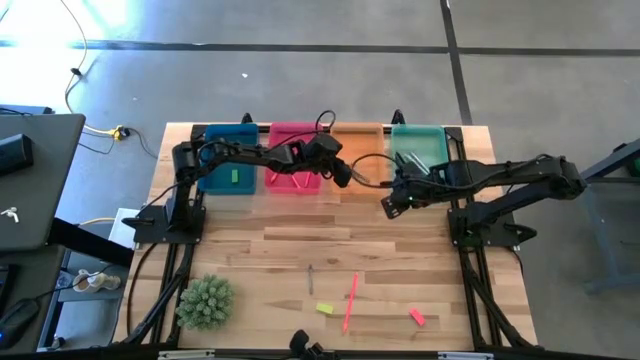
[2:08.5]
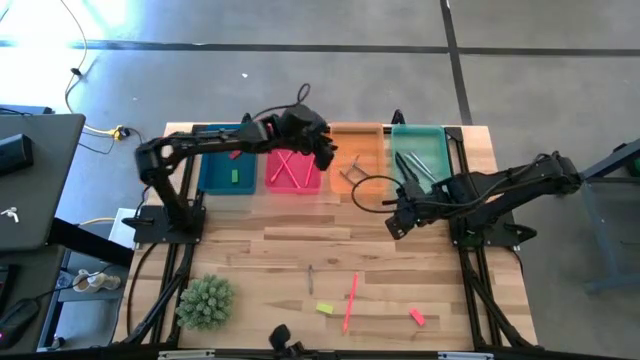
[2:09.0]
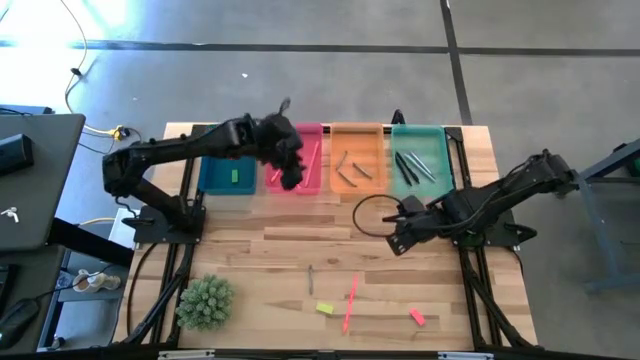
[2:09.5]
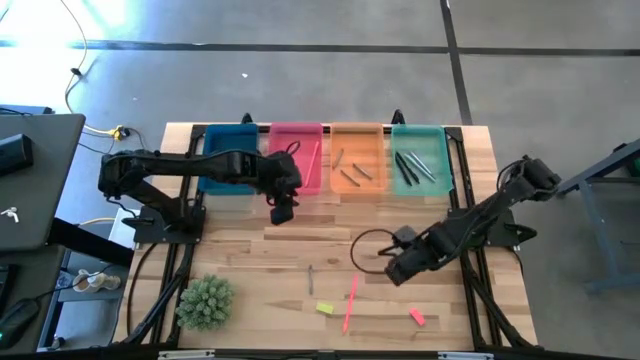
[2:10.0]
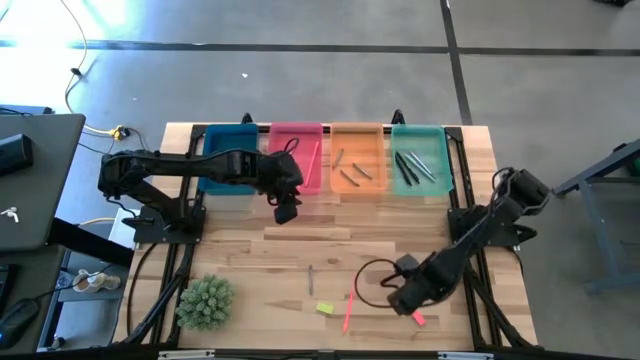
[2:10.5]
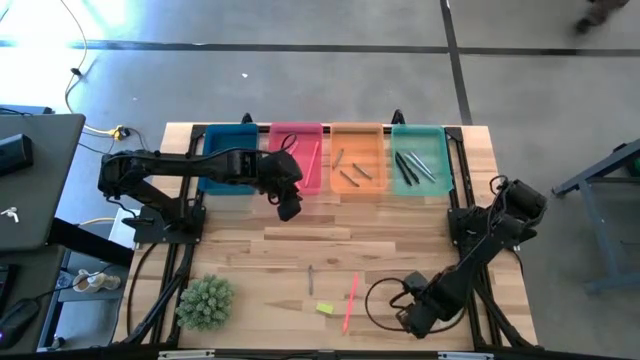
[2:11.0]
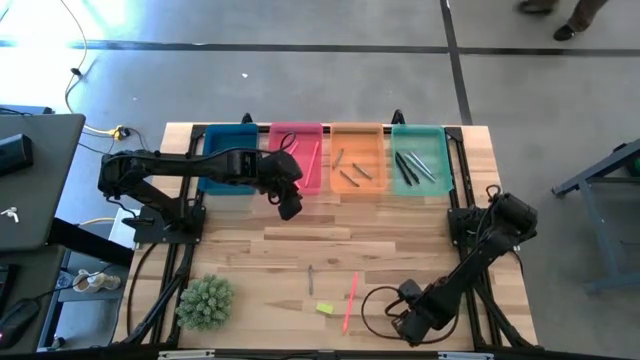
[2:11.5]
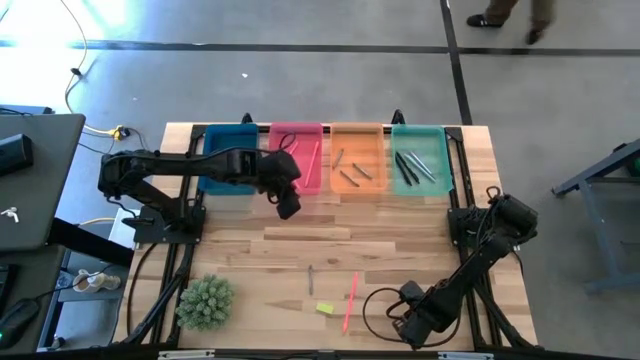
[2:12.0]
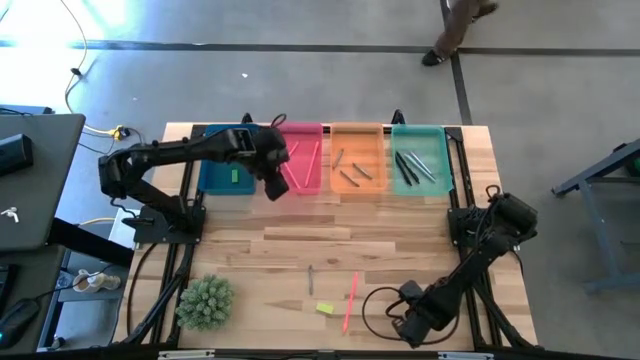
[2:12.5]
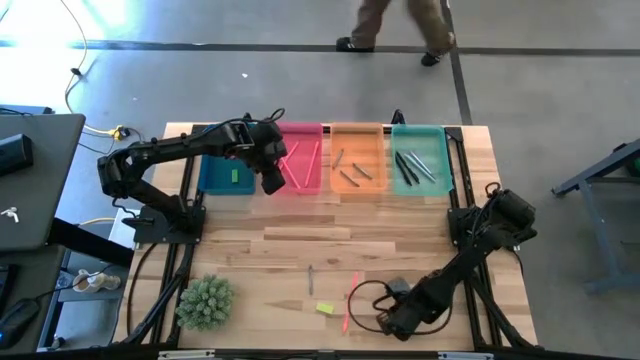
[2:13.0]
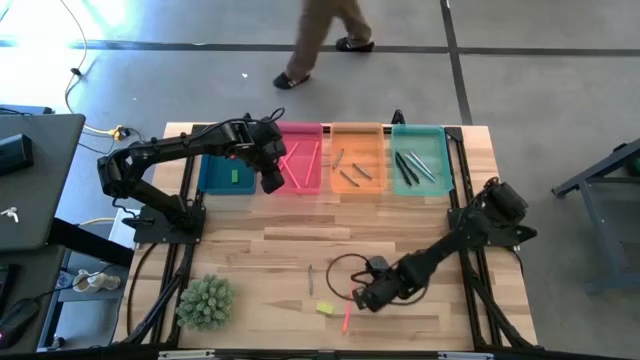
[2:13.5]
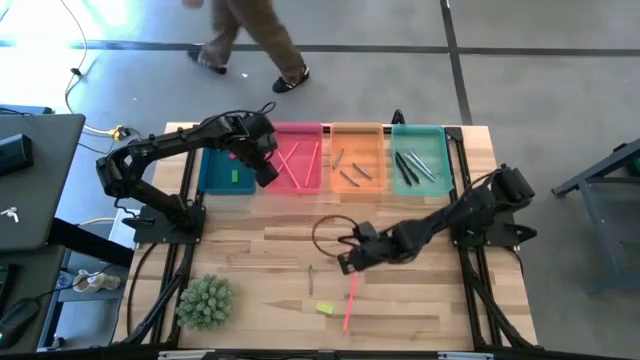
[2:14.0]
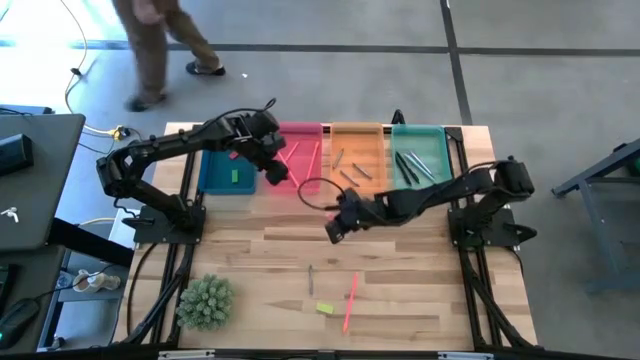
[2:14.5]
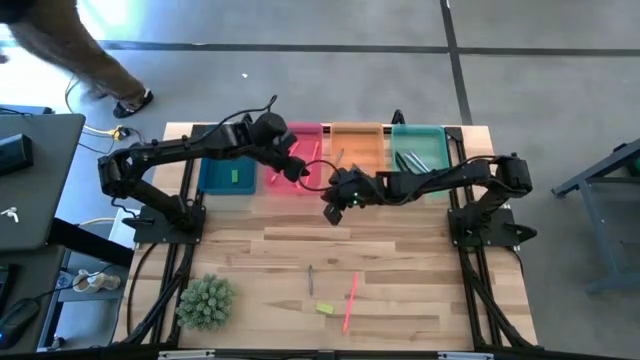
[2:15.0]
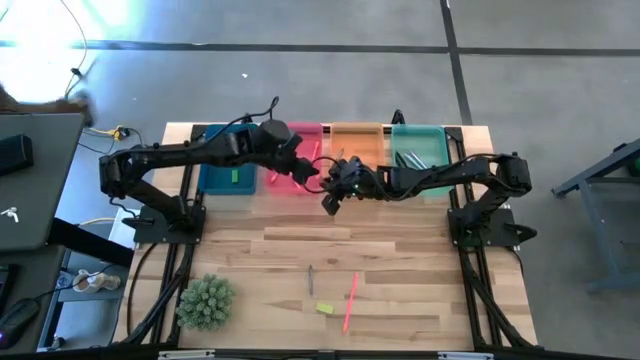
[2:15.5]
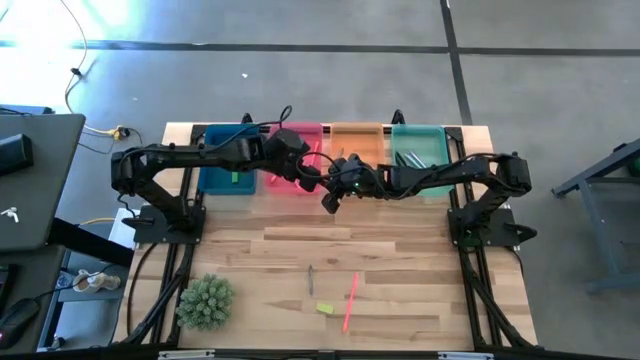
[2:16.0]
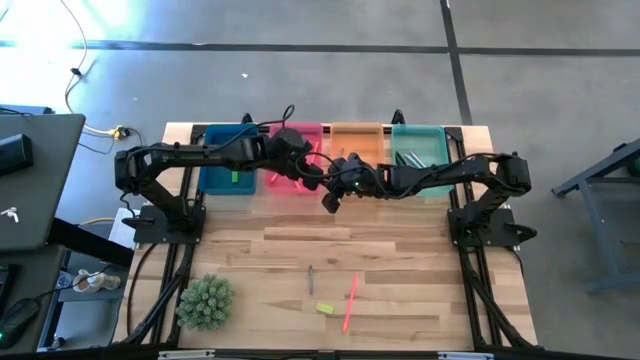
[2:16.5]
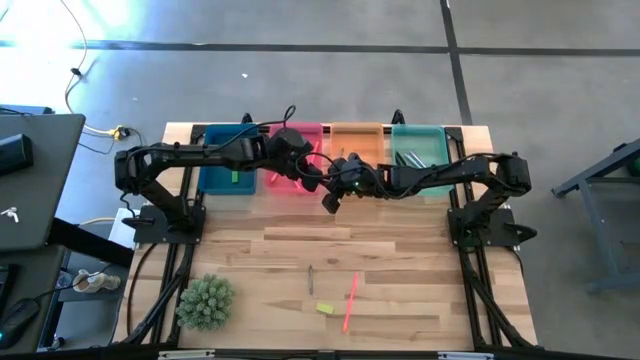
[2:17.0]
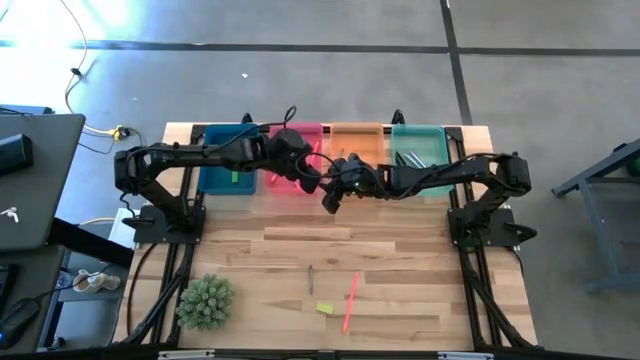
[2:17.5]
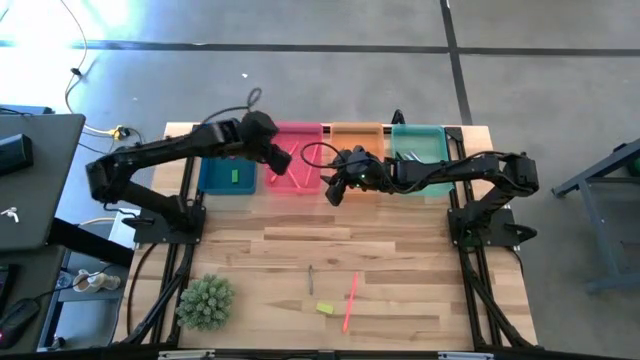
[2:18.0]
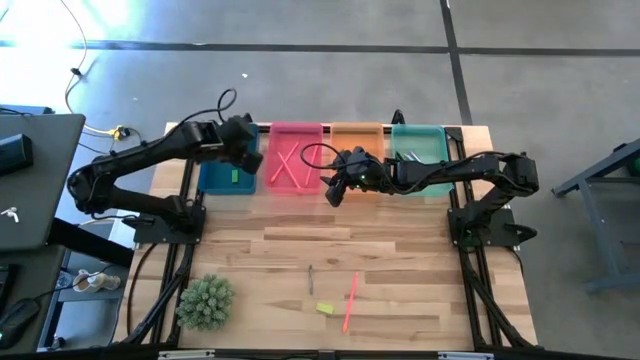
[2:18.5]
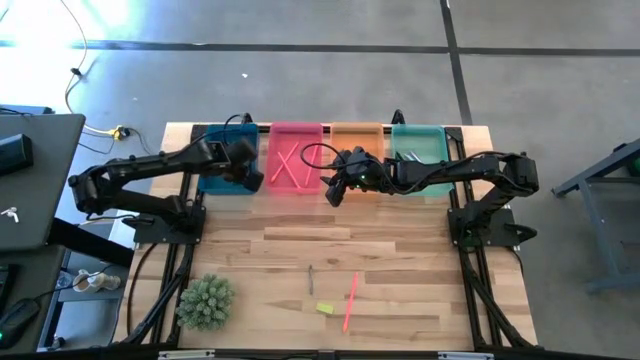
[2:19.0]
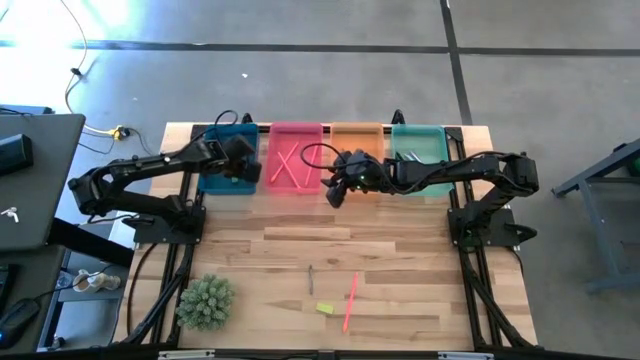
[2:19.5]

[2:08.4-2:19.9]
Task: Sort crayons/erasers/pens/pencils in bins
Put the pink eraser into the blue bin

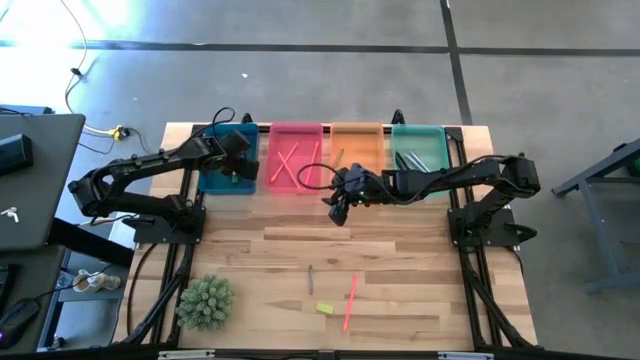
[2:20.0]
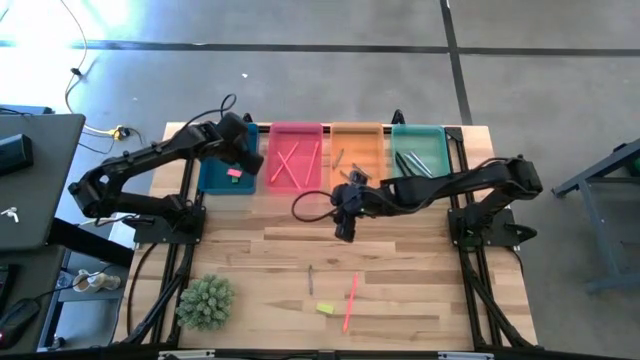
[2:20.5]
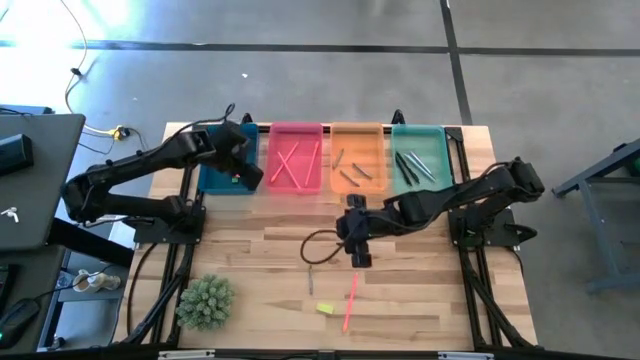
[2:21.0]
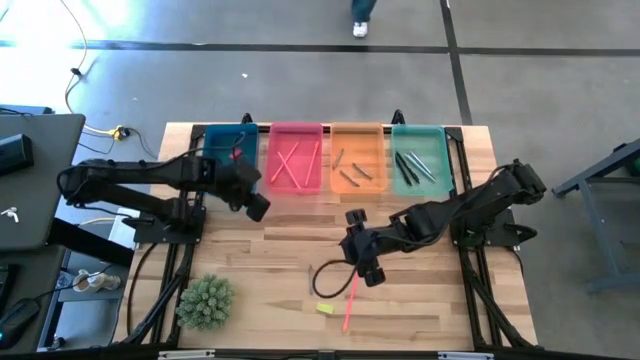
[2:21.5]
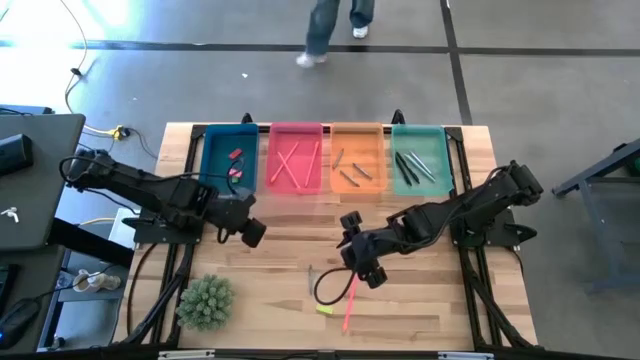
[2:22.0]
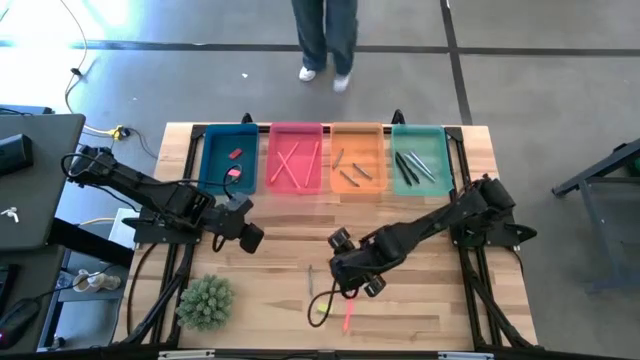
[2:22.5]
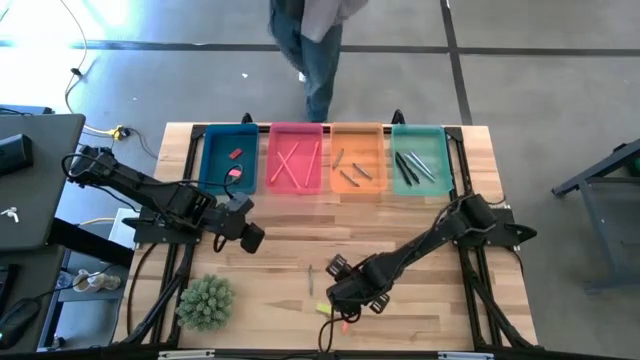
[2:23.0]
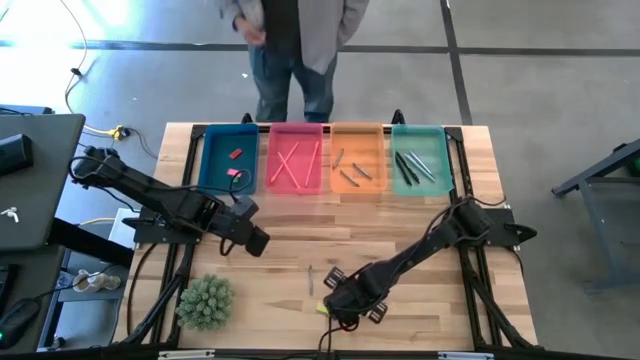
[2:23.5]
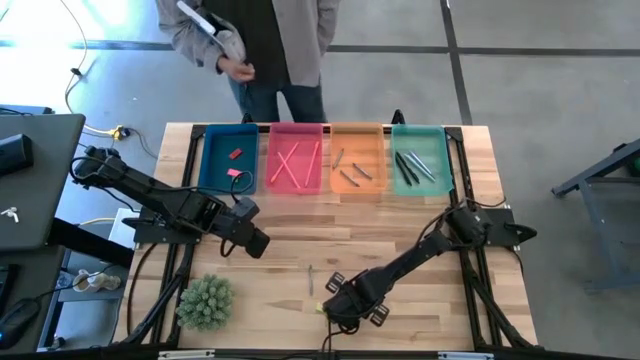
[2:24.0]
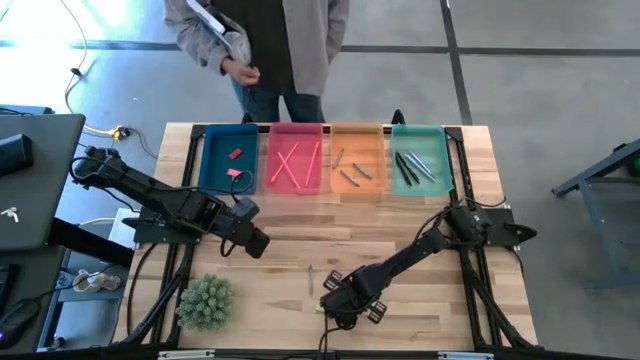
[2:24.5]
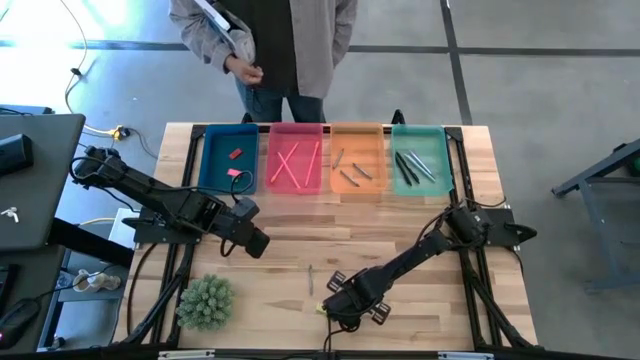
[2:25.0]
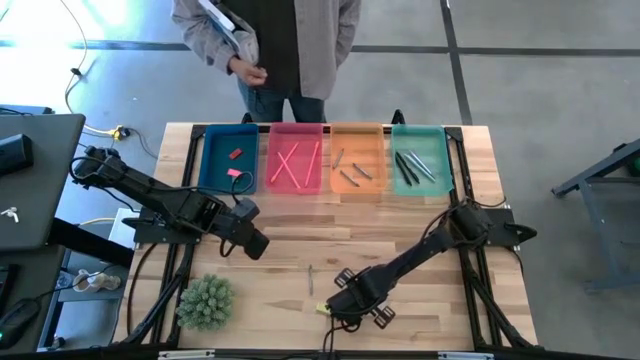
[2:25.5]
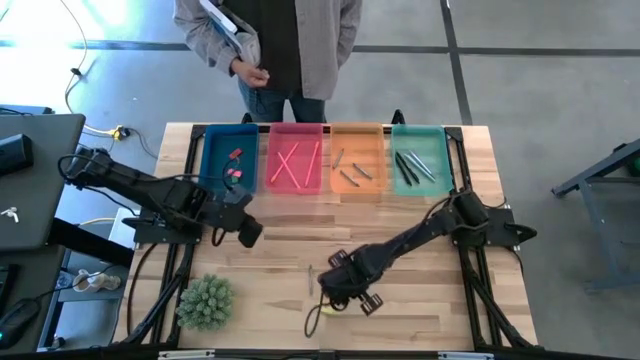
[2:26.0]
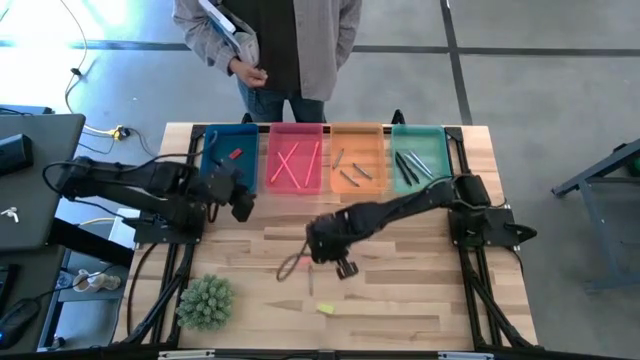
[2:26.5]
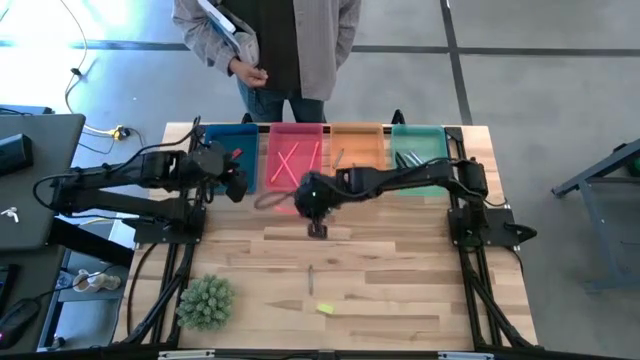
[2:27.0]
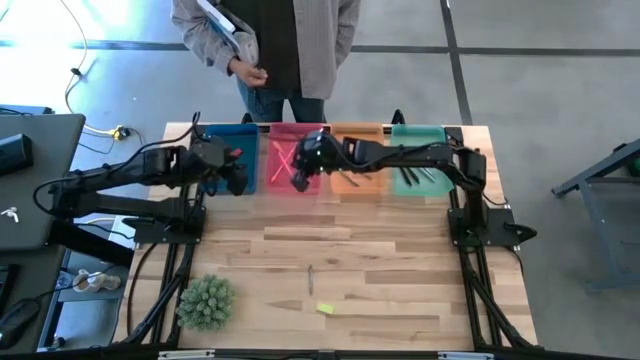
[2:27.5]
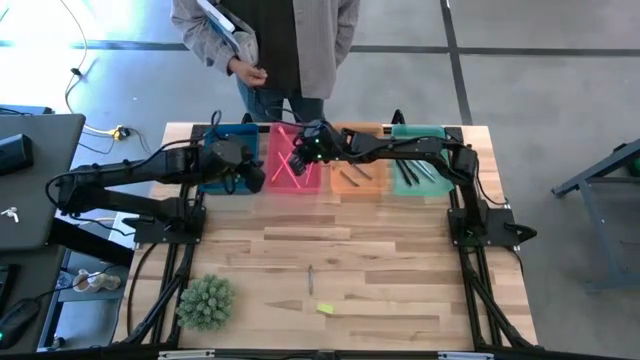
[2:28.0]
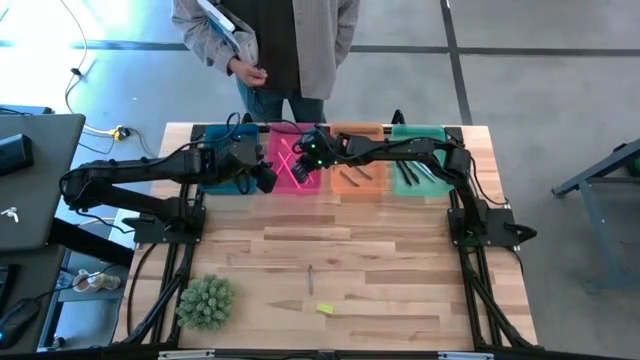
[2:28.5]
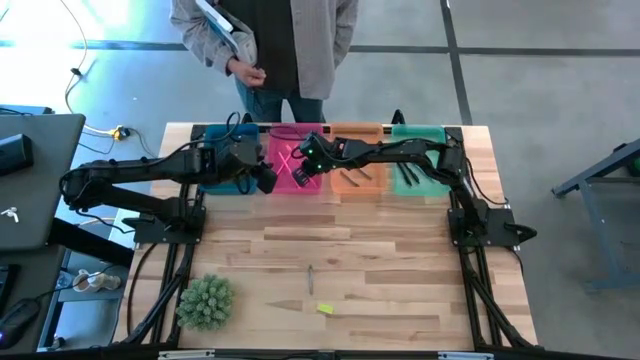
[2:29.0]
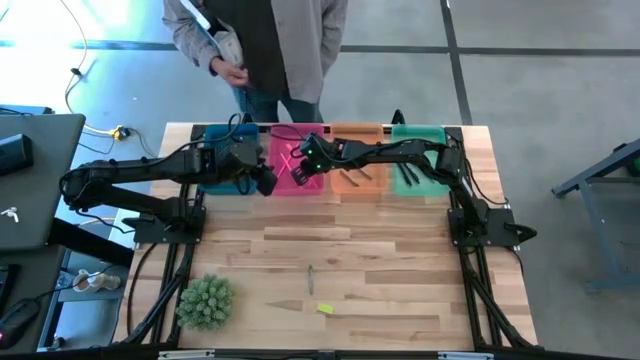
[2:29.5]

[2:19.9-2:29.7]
Put the pink pencil into the pink bin
